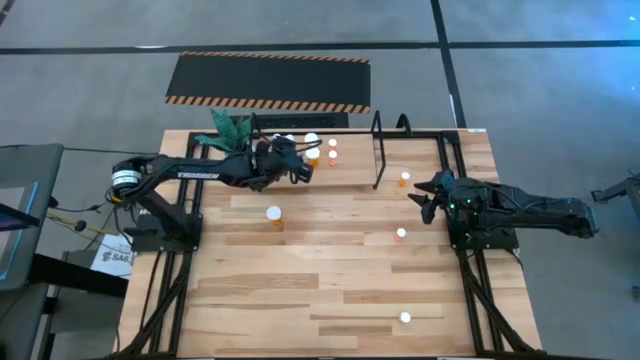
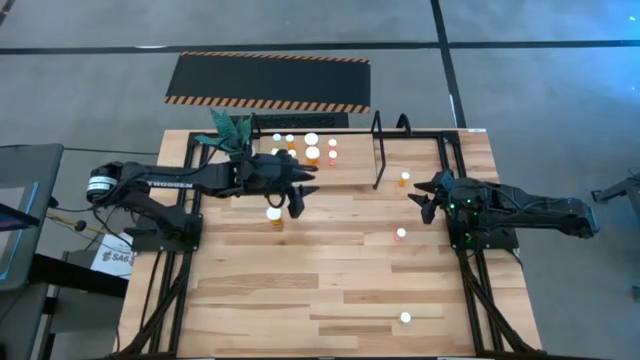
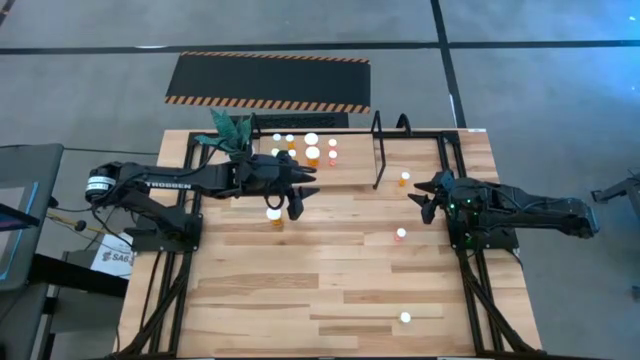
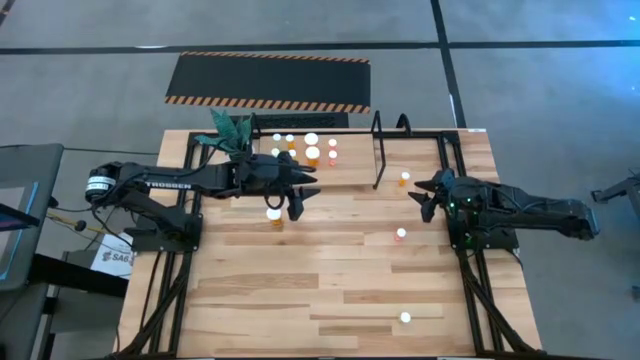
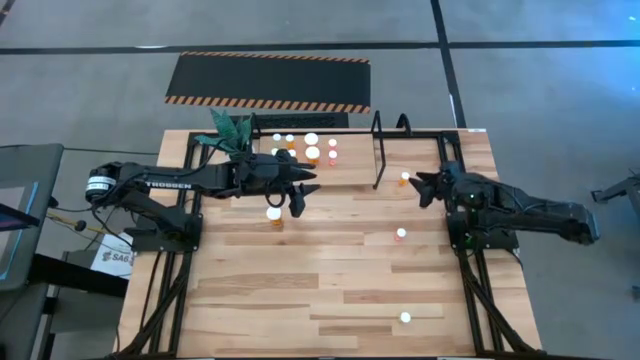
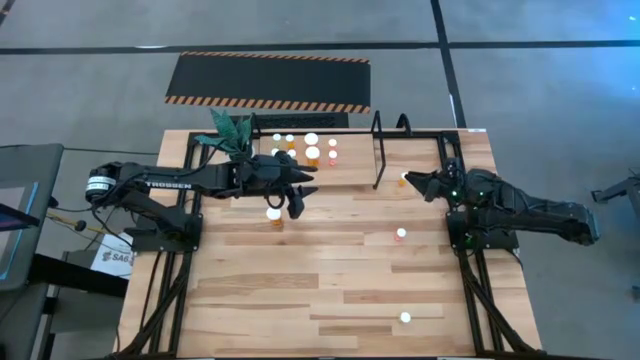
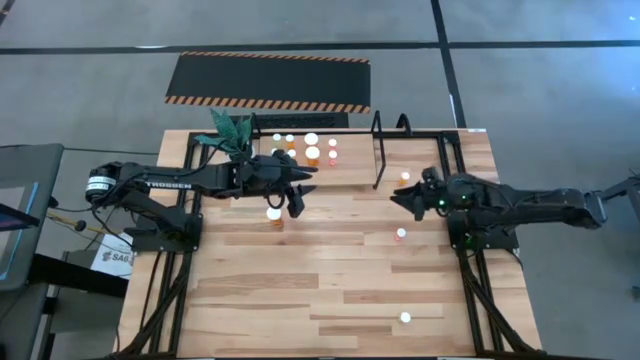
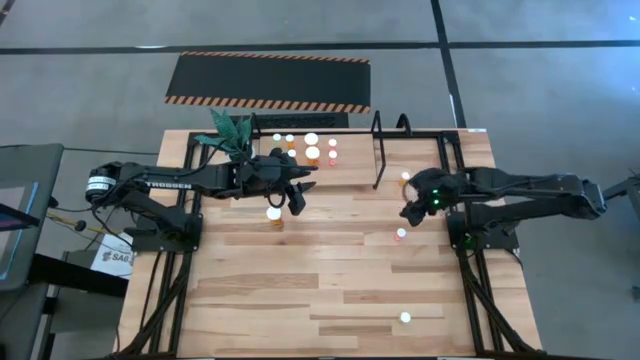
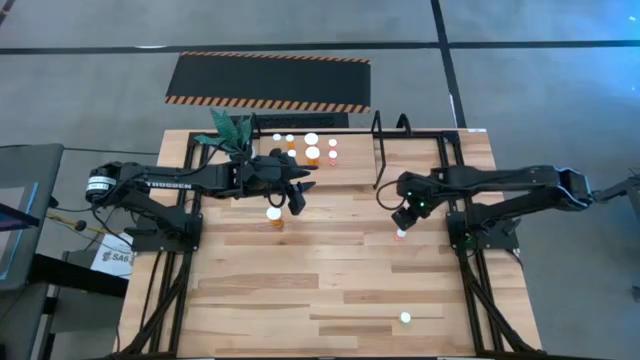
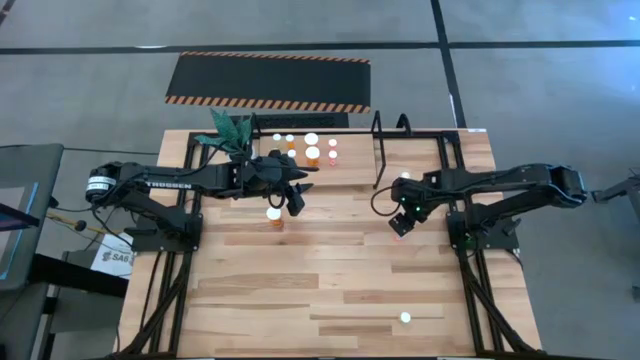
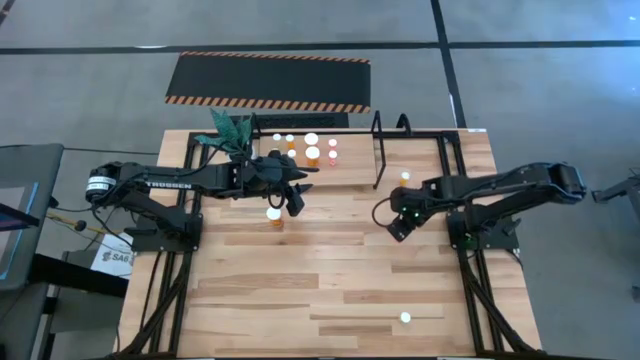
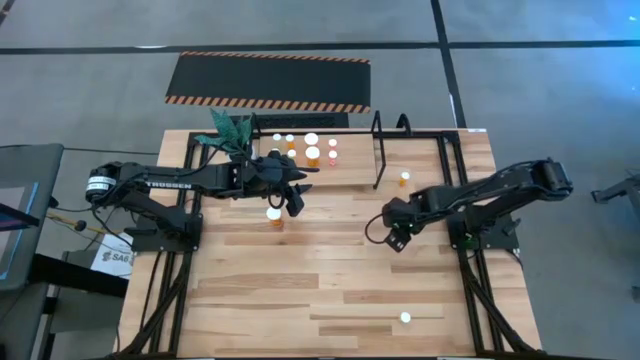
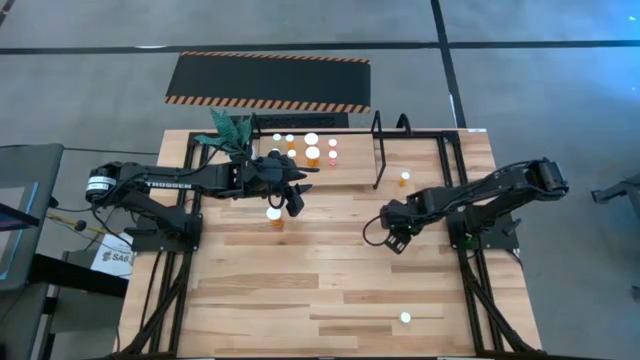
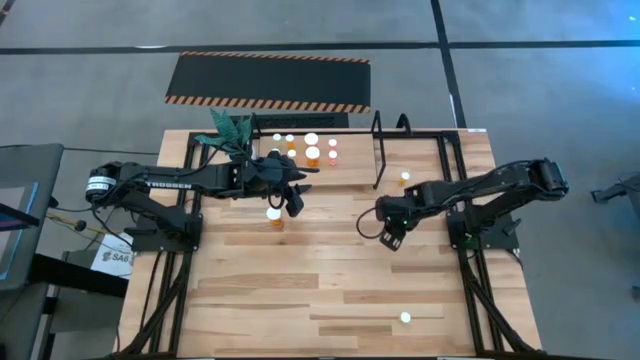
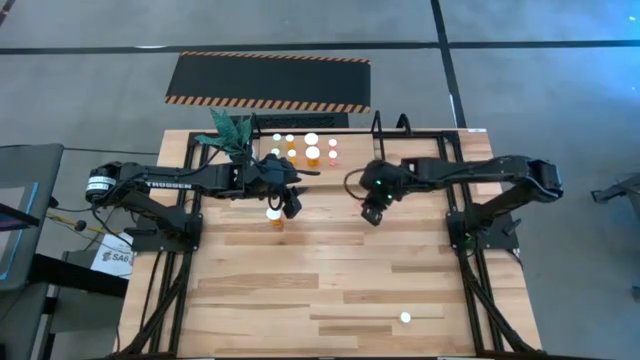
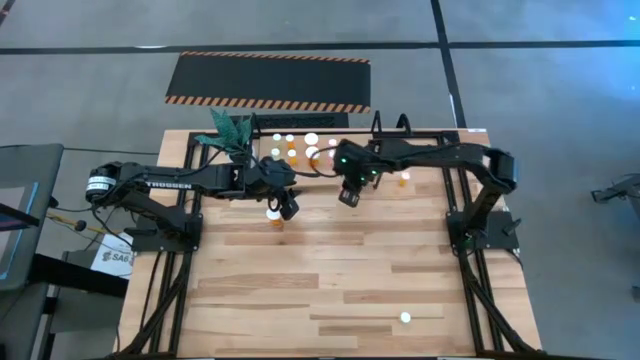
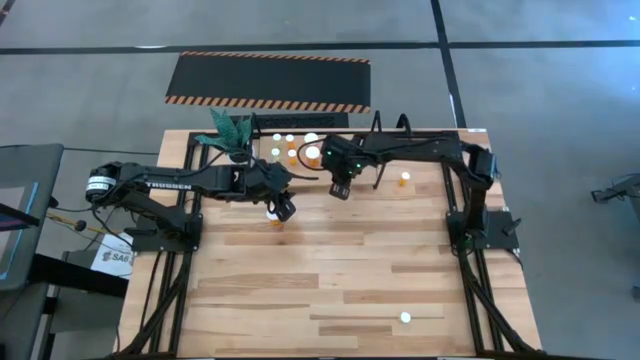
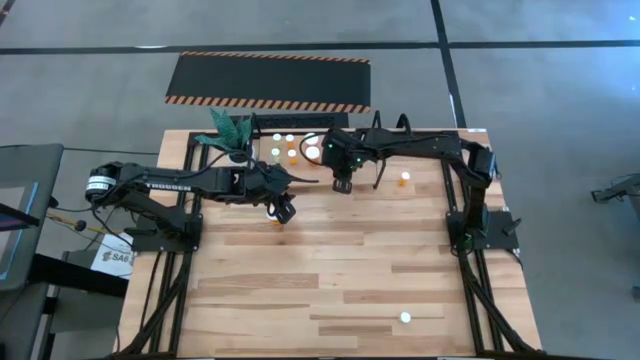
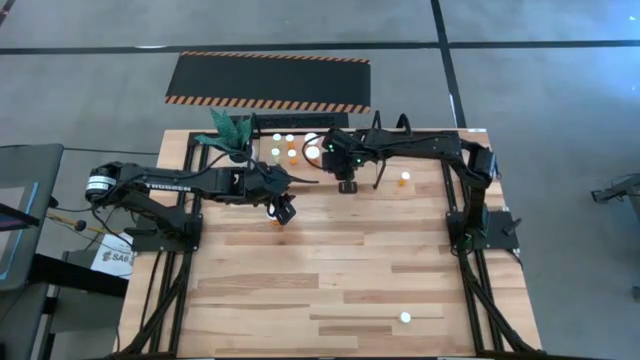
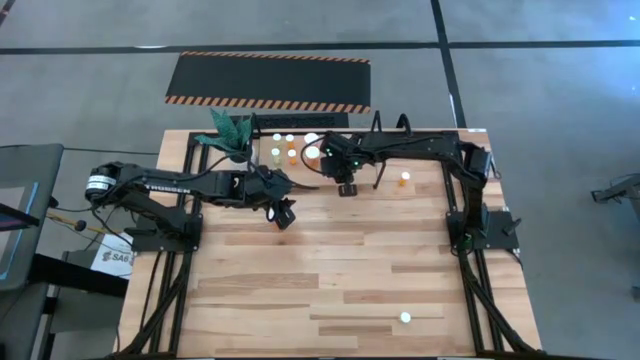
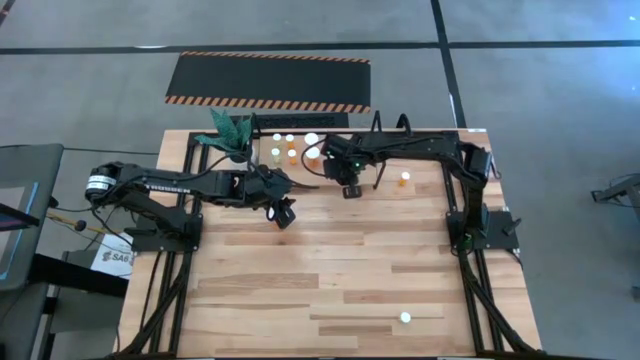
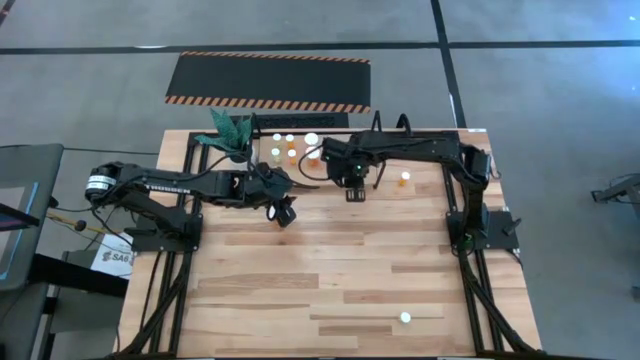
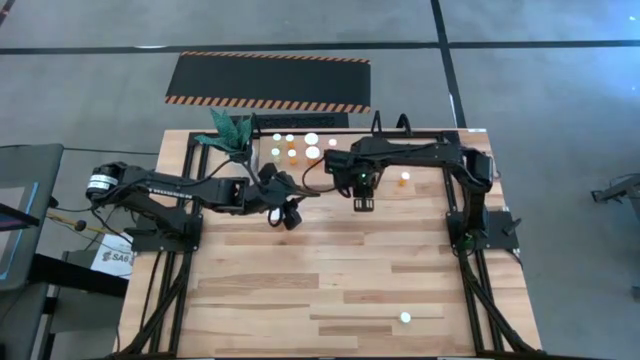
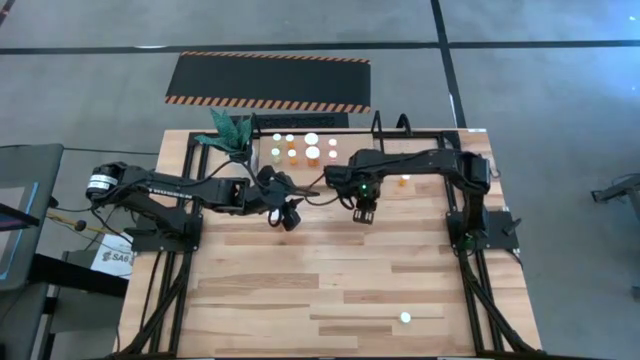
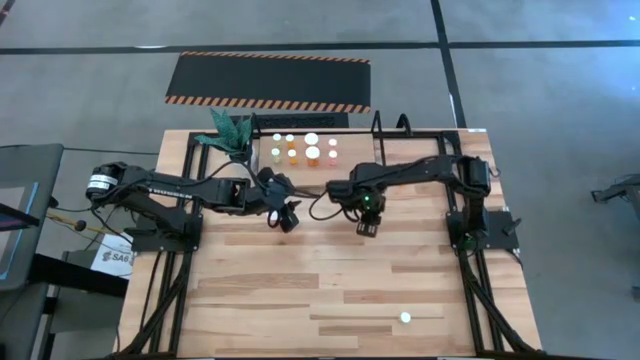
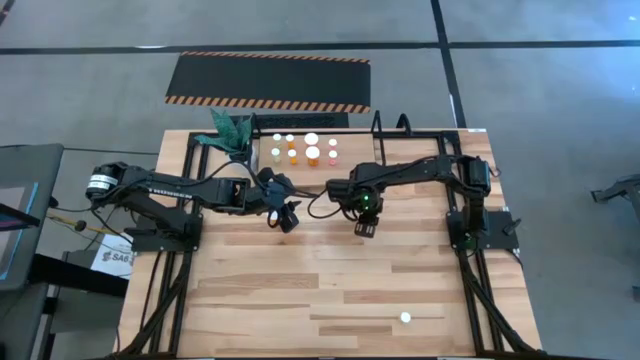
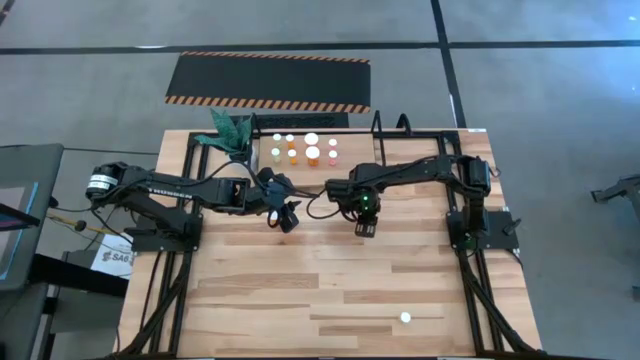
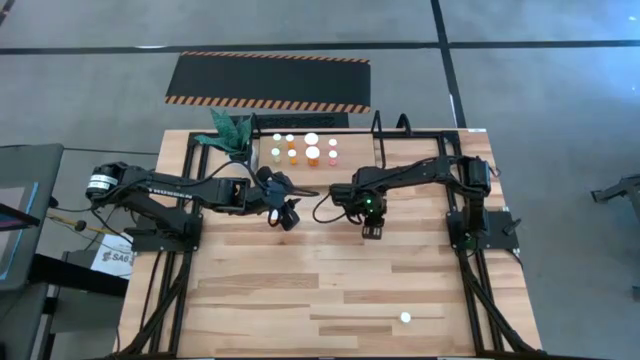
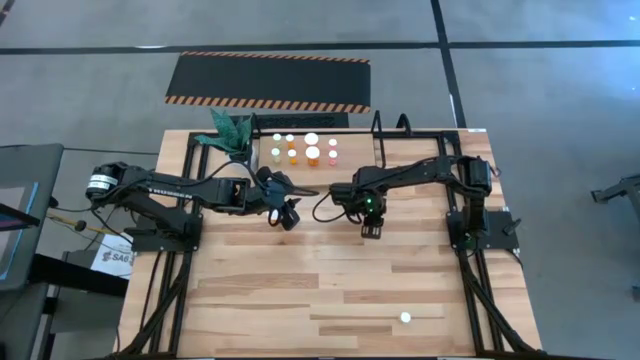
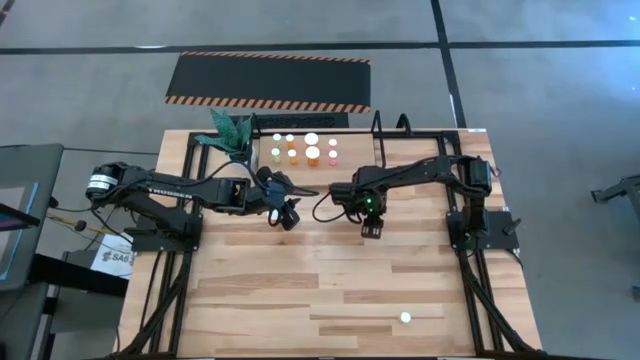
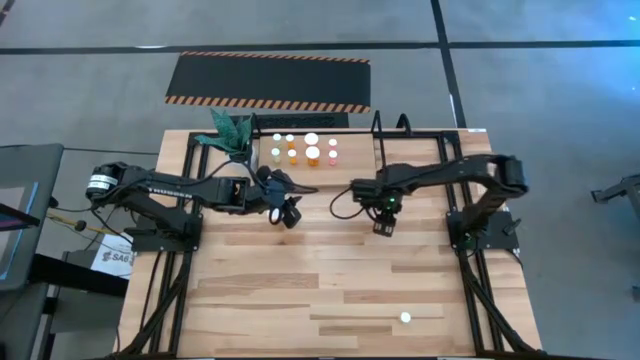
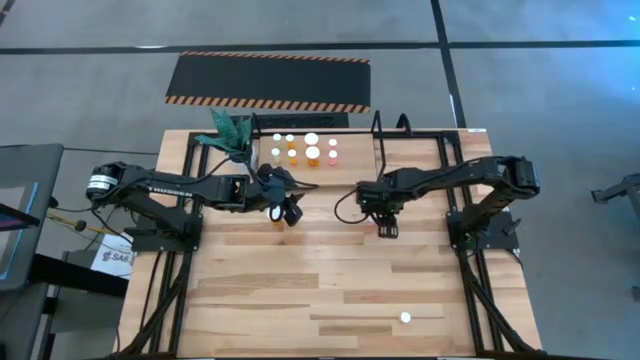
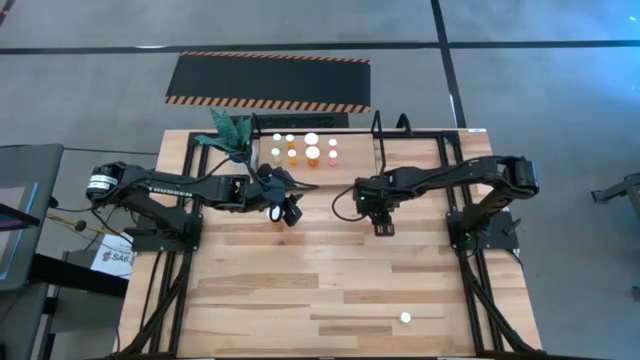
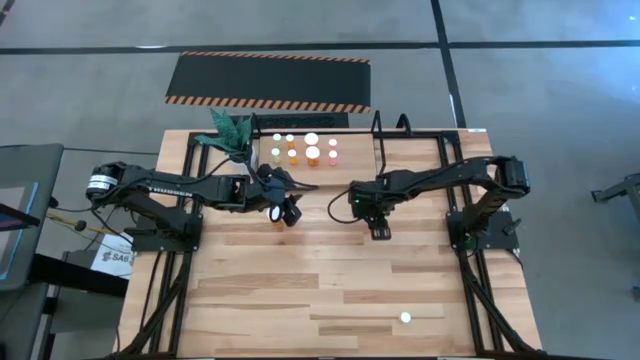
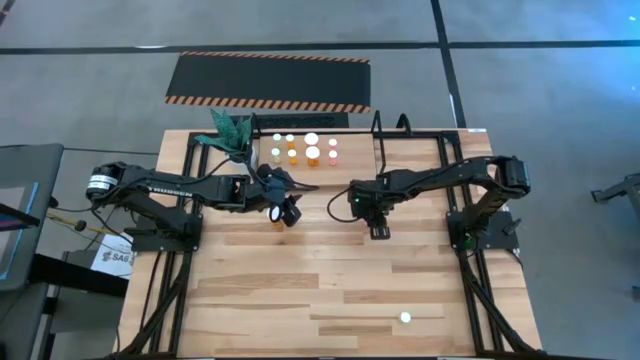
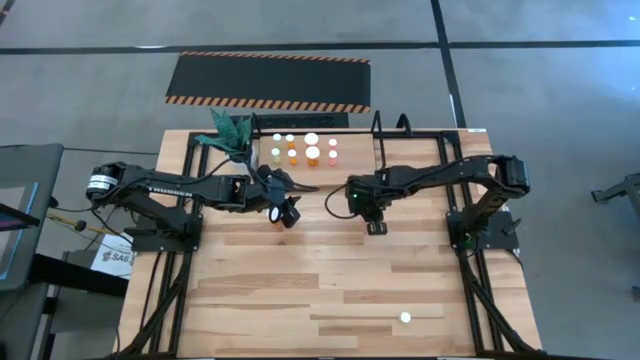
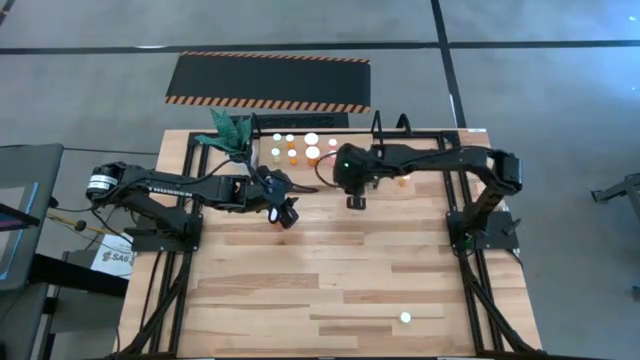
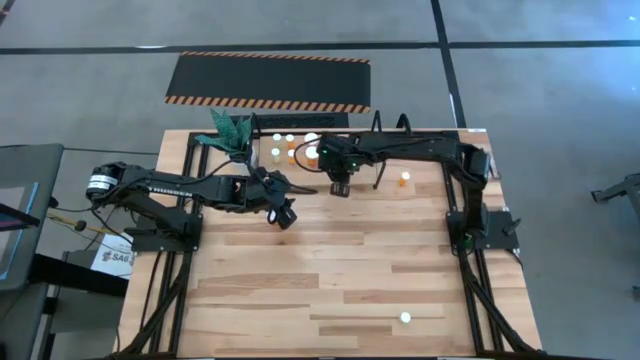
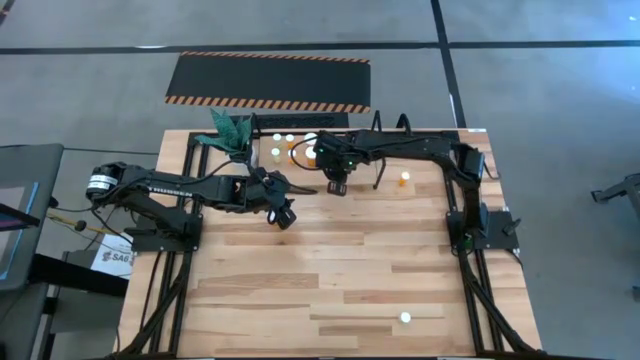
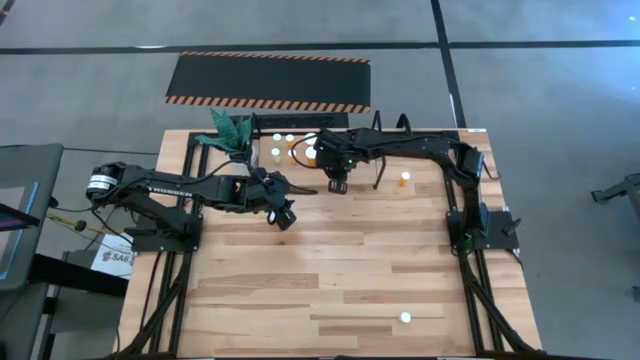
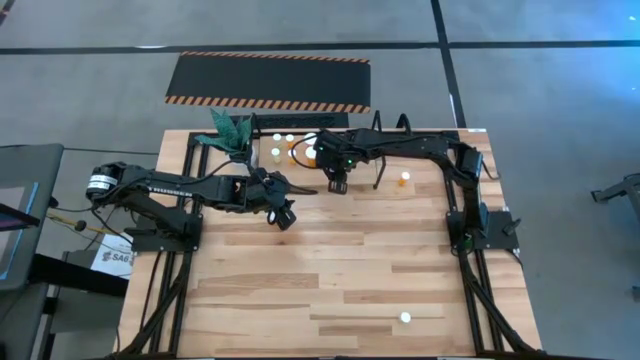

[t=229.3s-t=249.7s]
Task: Pick and place medicine bottles onto shelf by color
Put the pink pill bottle on the shelf aligned with the other pink pill bottle
